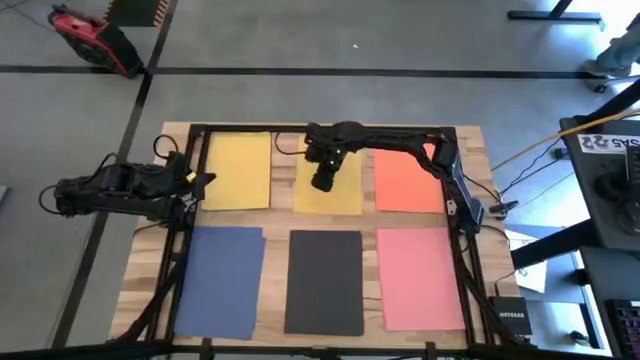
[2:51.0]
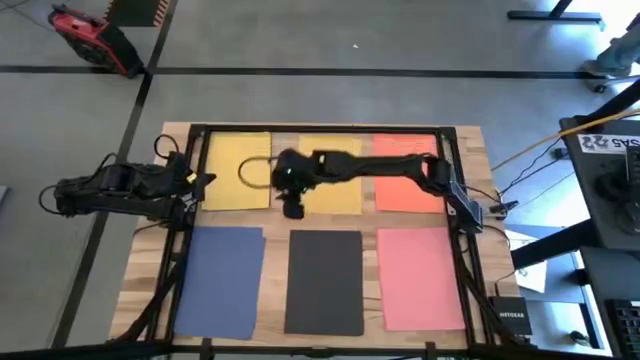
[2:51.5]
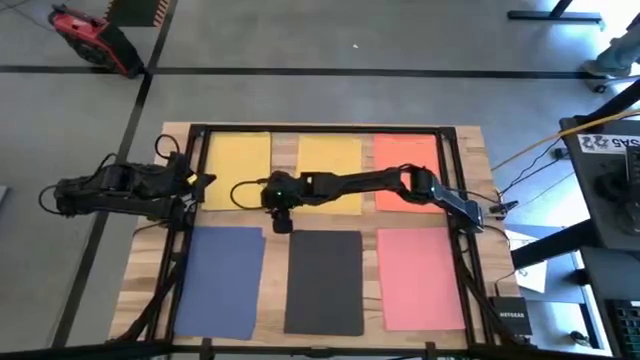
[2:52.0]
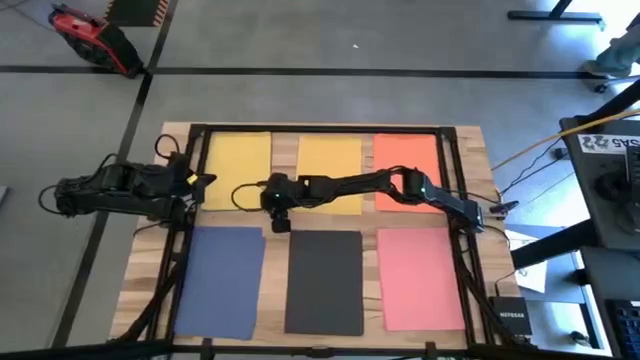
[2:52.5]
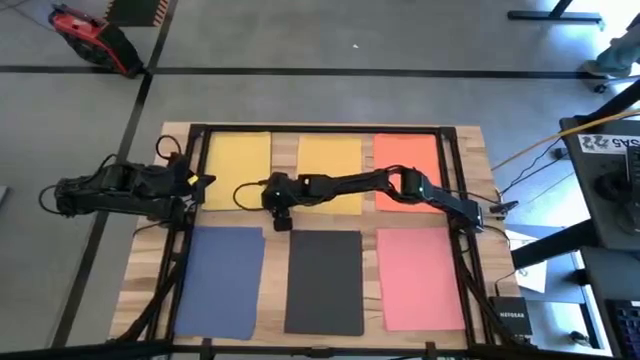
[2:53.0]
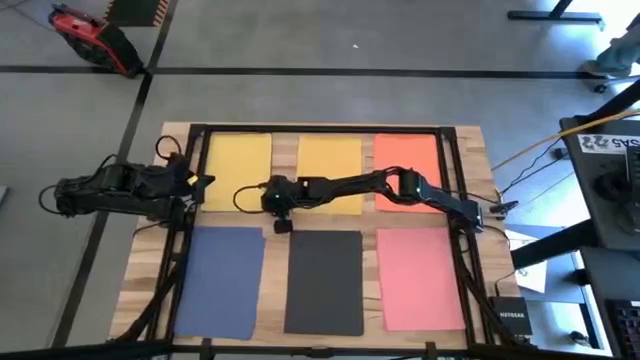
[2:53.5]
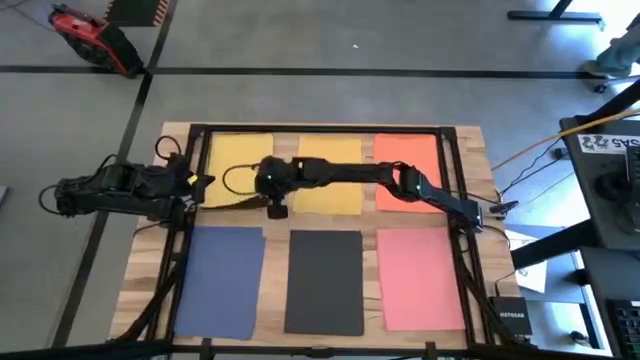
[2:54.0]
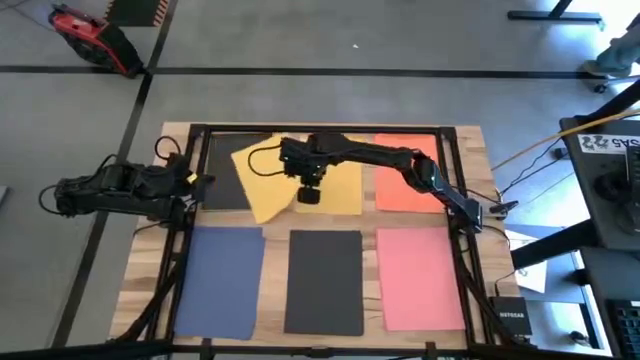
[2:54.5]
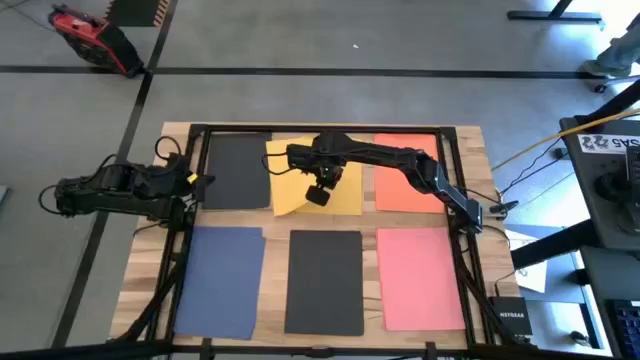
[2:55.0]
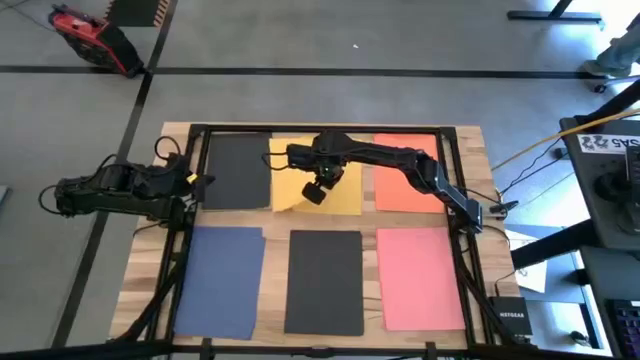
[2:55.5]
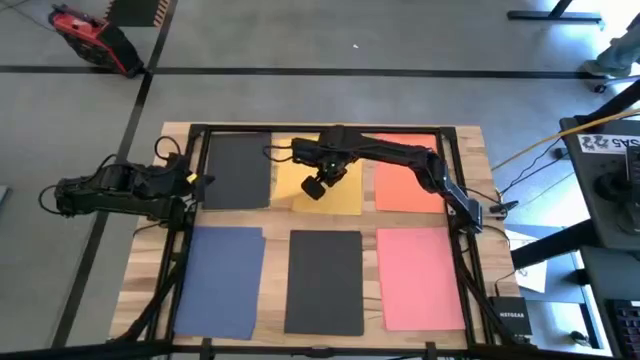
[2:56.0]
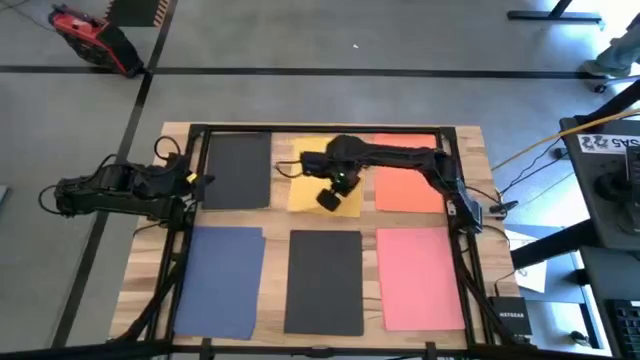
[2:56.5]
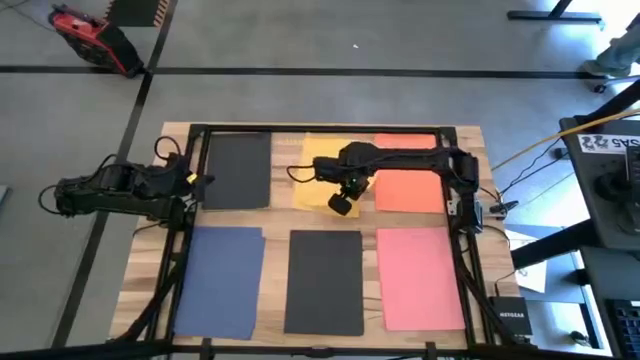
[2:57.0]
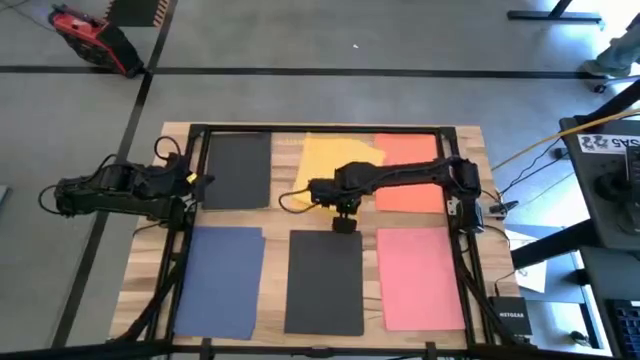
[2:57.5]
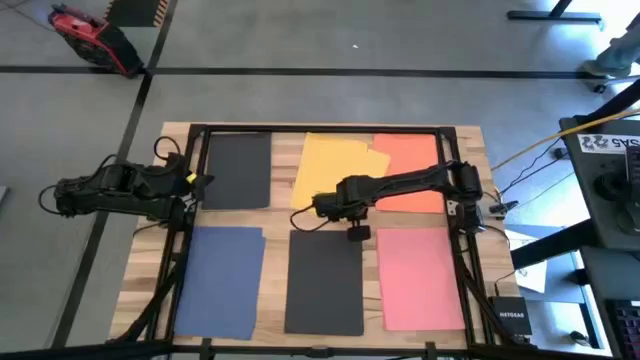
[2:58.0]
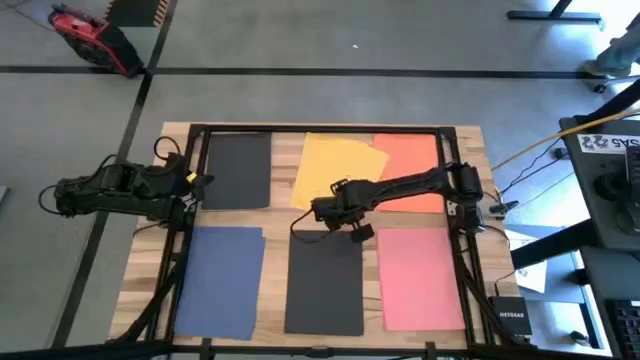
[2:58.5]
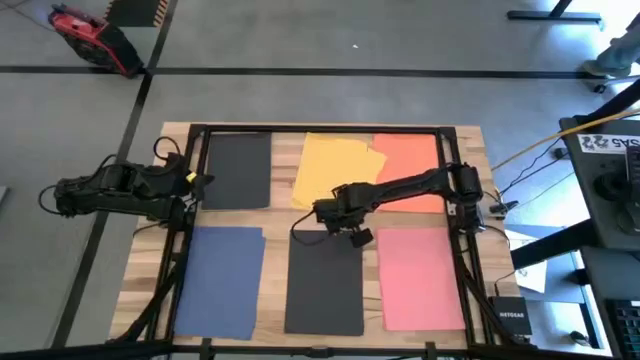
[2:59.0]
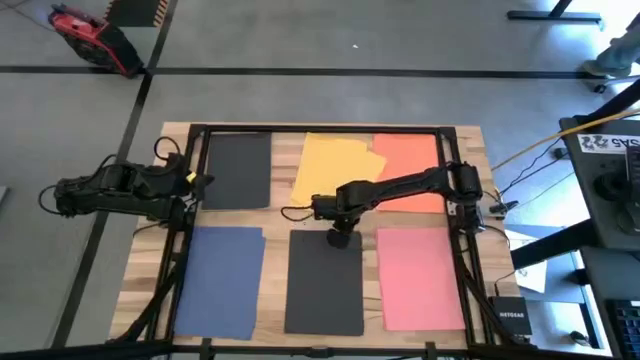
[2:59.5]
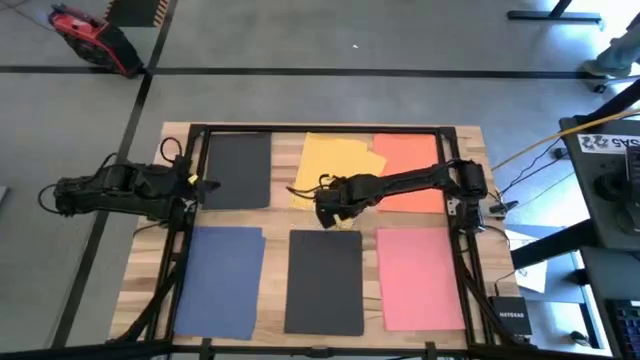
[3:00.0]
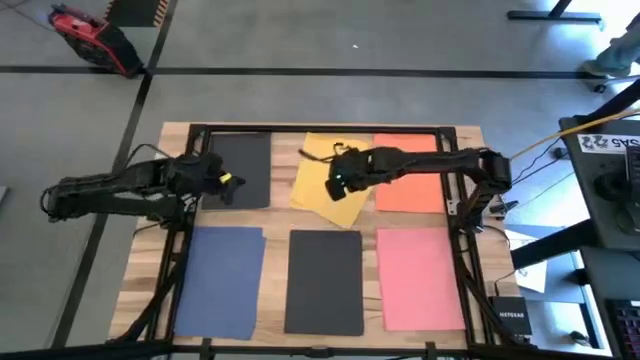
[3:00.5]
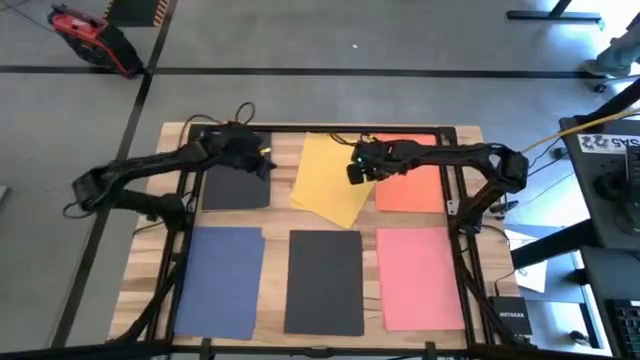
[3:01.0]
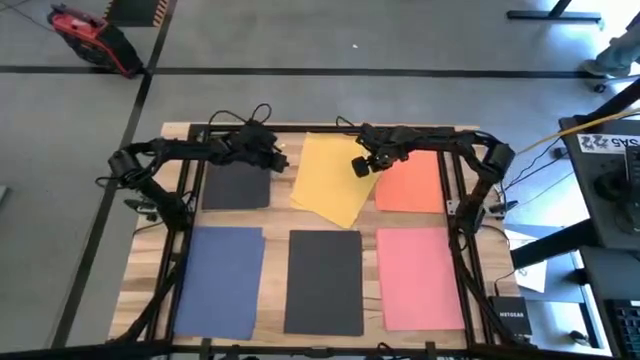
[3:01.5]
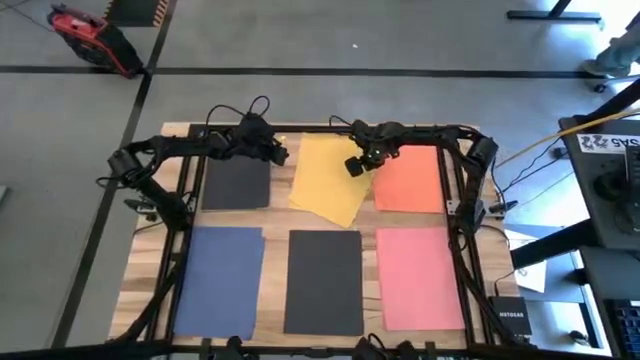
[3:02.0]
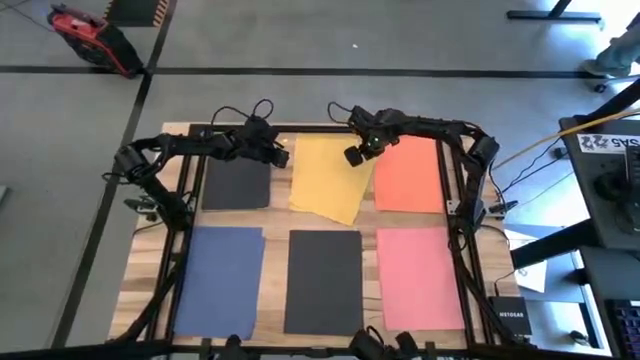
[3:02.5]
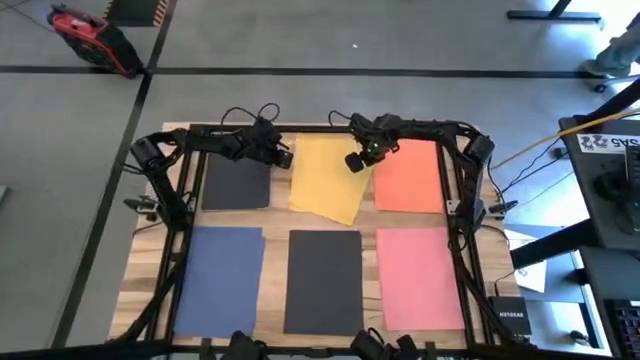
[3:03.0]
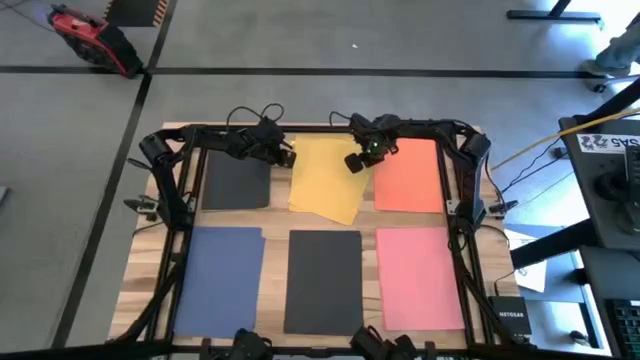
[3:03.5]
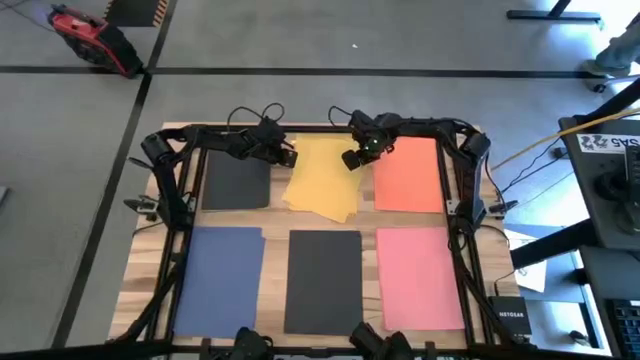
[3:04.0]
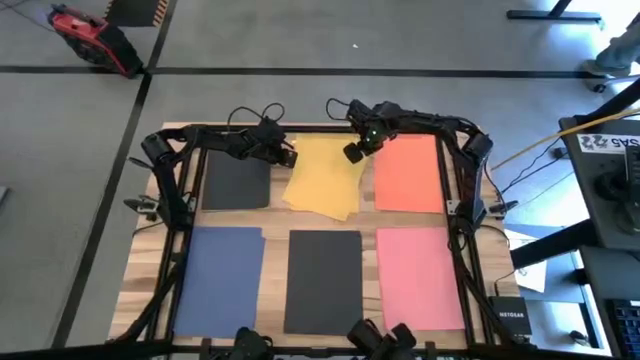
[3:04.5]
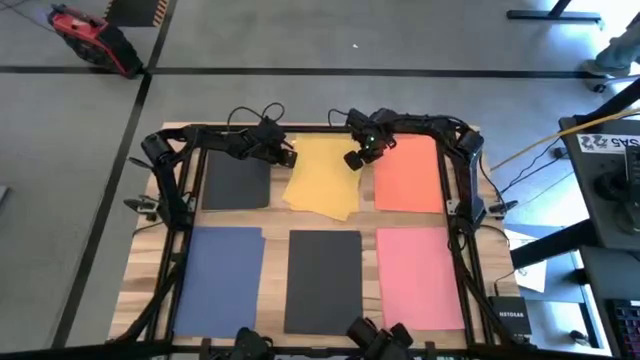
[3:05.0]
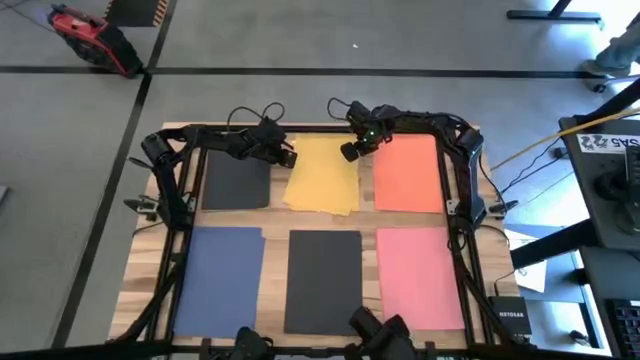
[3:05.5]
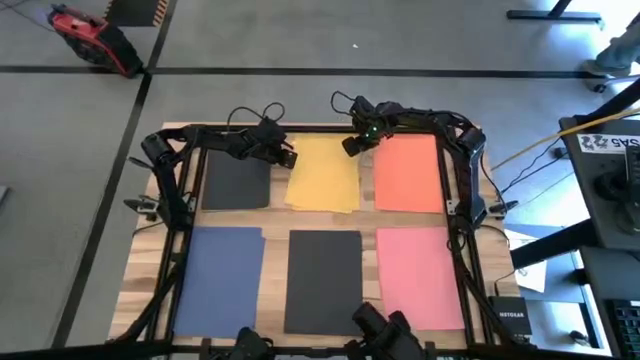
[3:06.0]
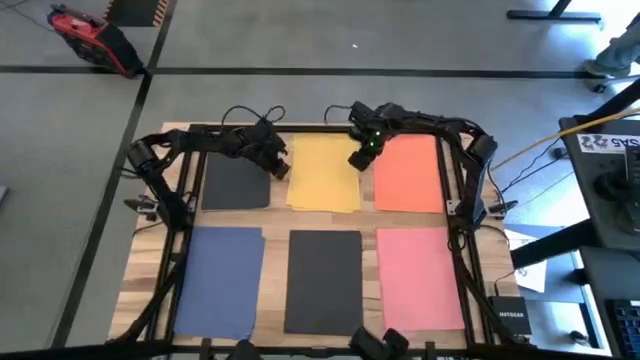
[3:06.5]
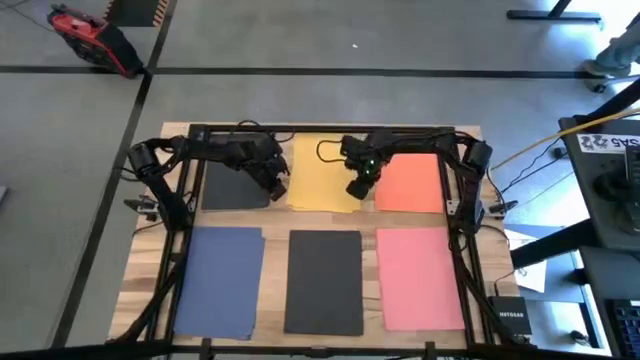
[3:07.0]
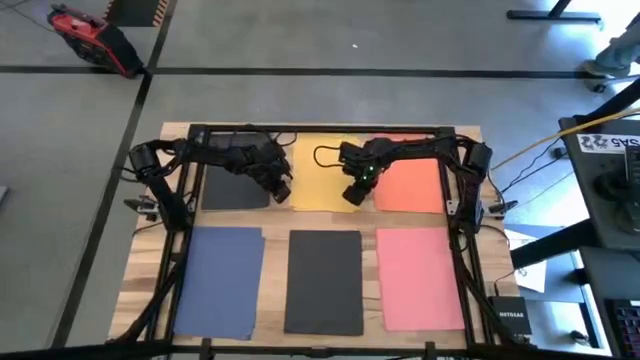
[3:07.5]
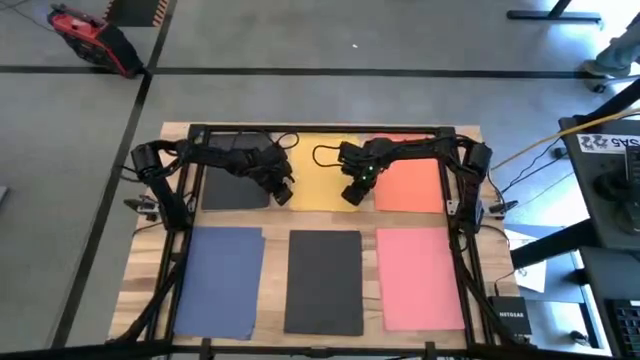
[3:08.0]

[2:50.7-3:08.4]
Task: Organize paper
Stack the yellow colored paper on top of the yellow colored paper

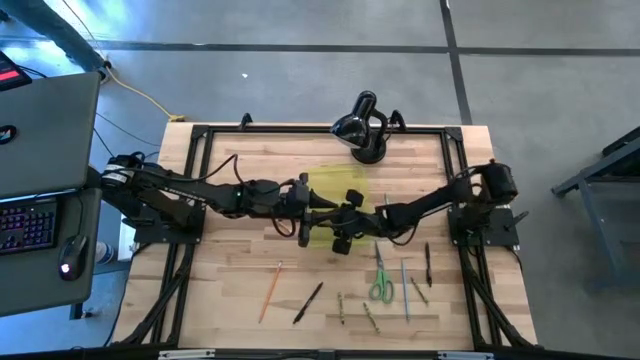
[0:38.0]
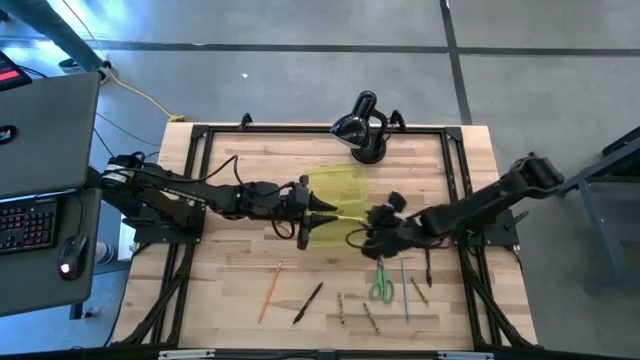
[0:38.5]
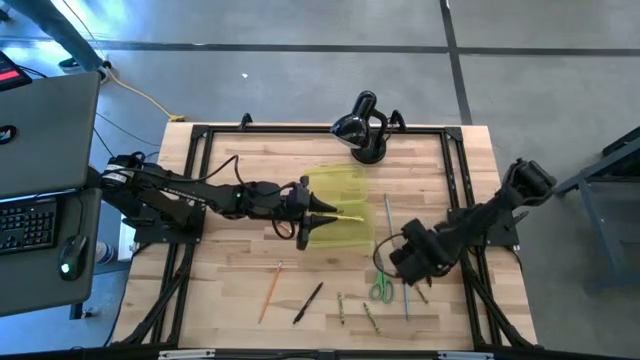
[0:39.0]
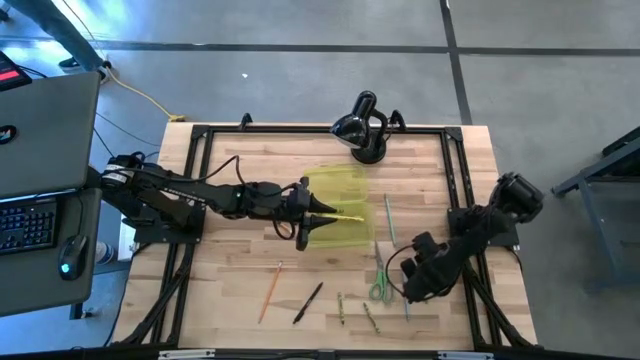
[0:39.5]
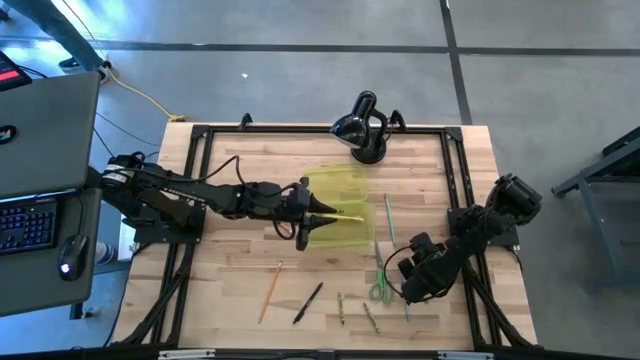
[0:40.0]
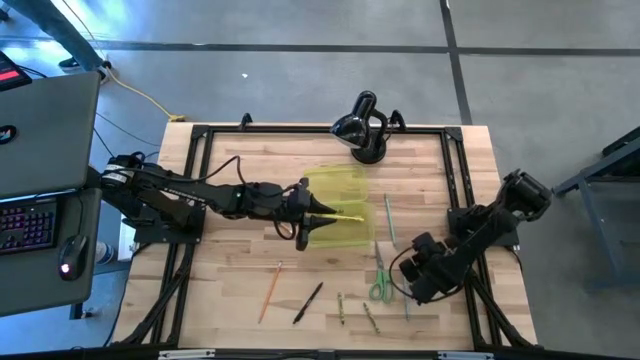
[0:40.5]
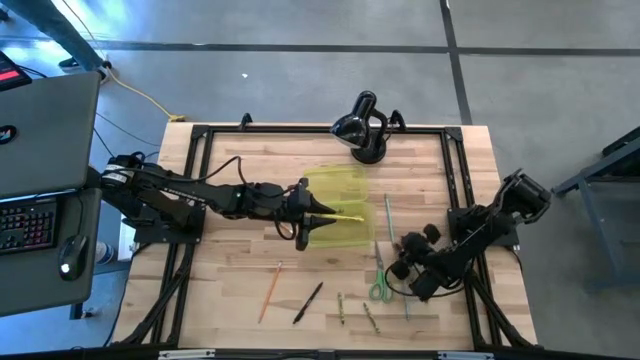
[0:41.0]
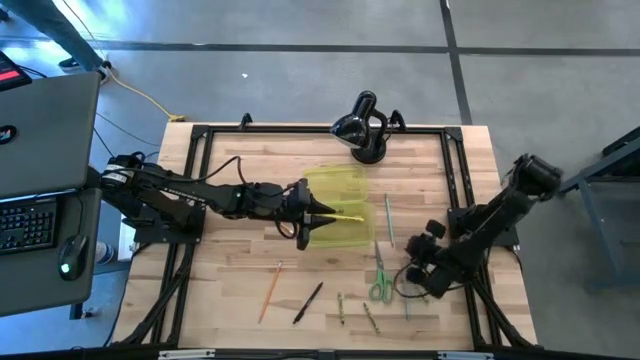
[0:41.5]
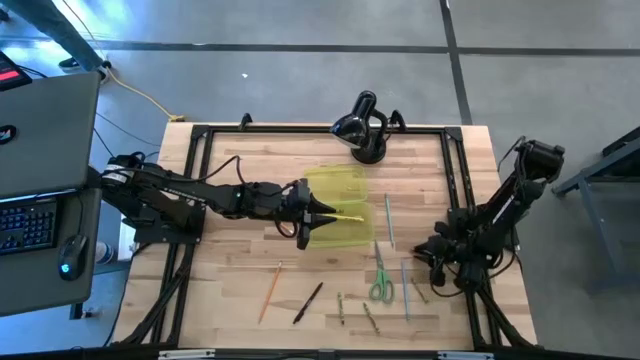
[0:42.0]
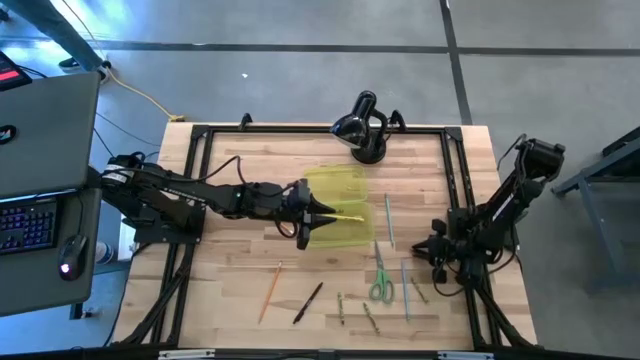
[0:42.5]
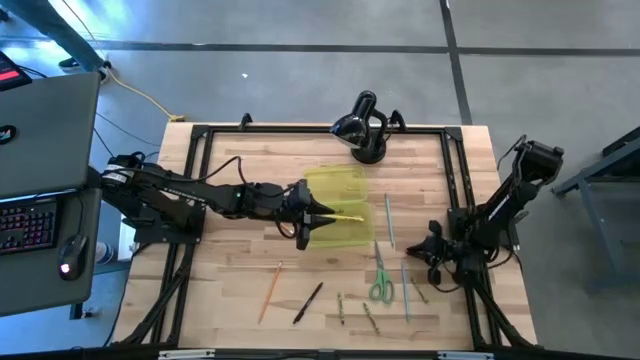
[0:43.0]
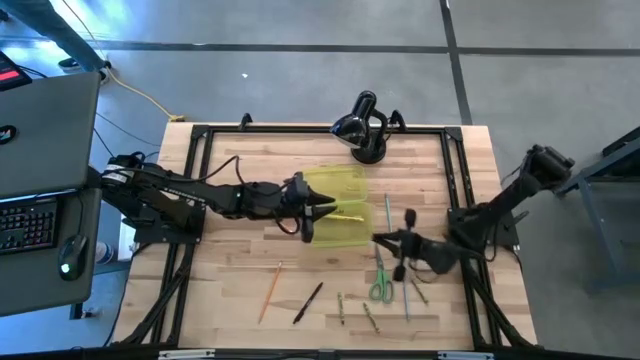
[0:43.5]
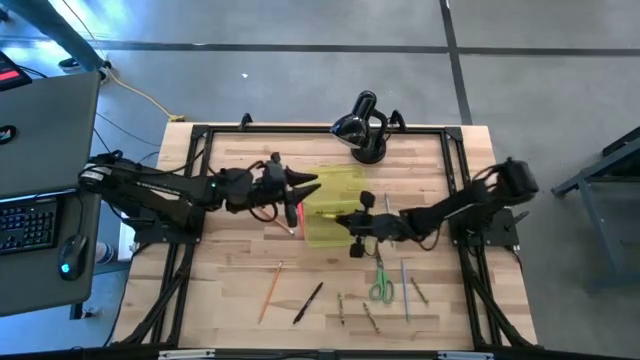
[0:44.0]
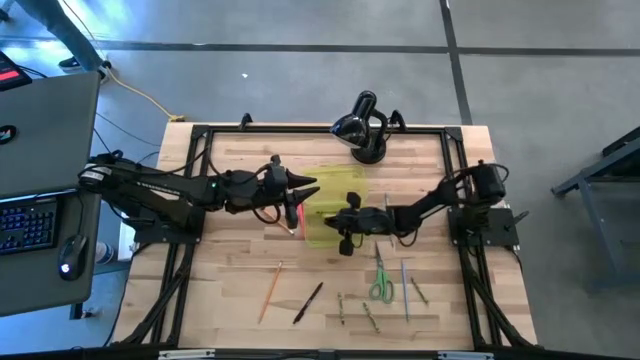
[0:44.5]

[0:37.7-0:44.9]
Task: Pick & place school supplies into a supply box
Put the black pen into the yellow school supply box
